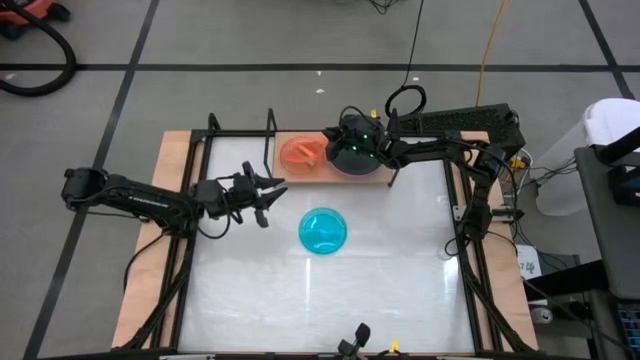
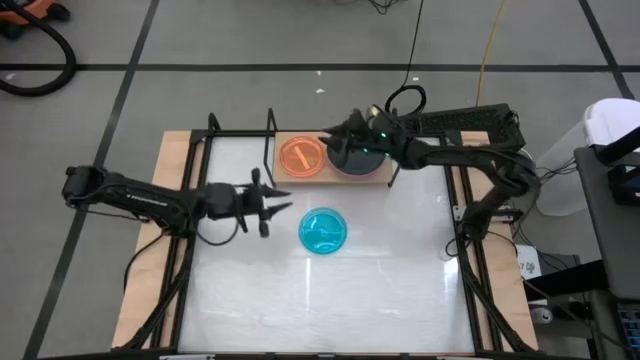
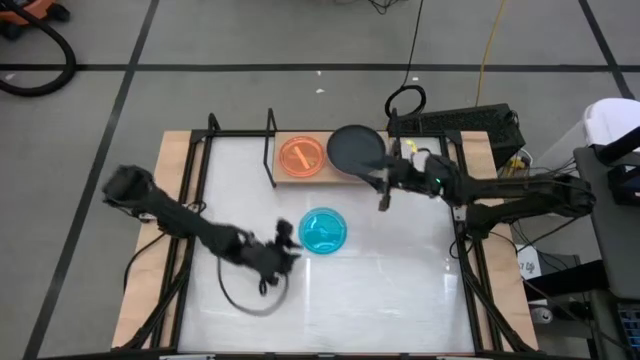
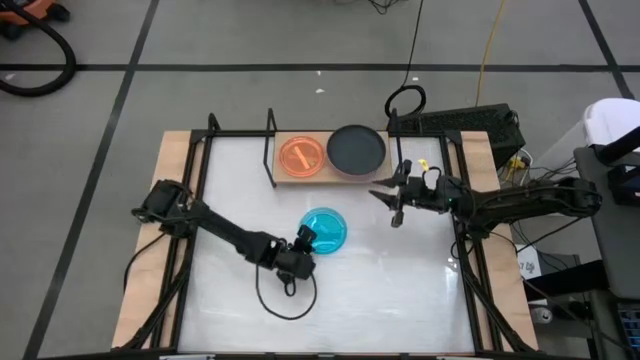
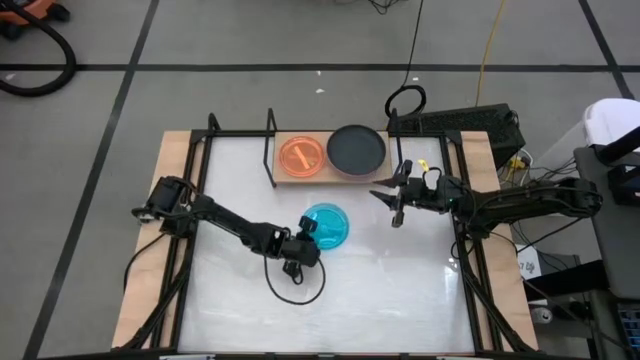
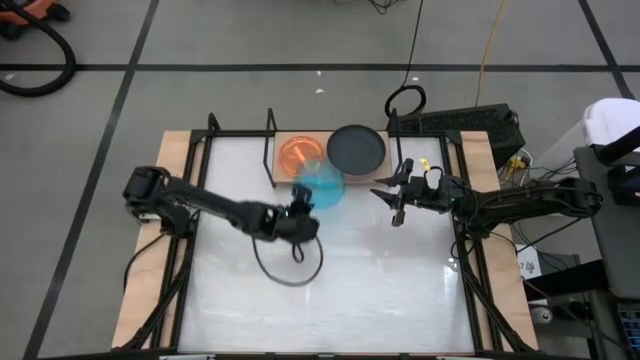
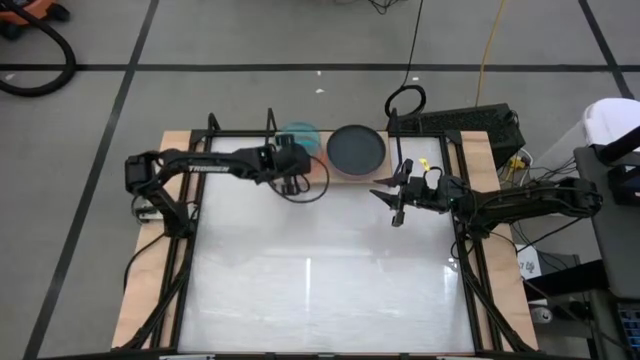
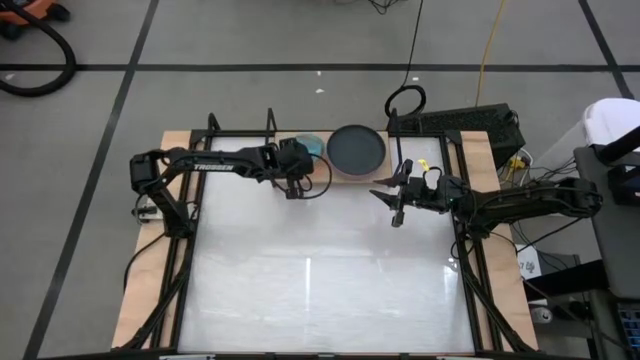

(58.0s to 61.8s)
Task: Place and stack plates onto a shelf
Stack the small blue plate on top of the small orange plate on the shelf

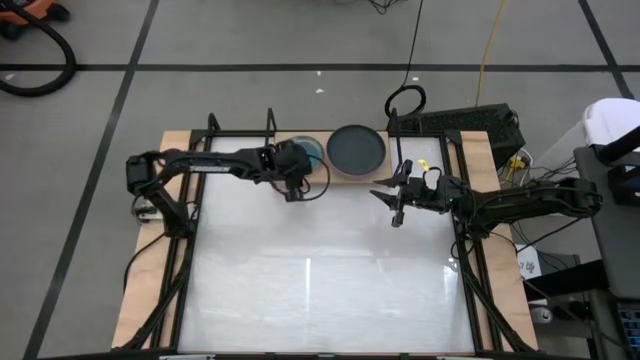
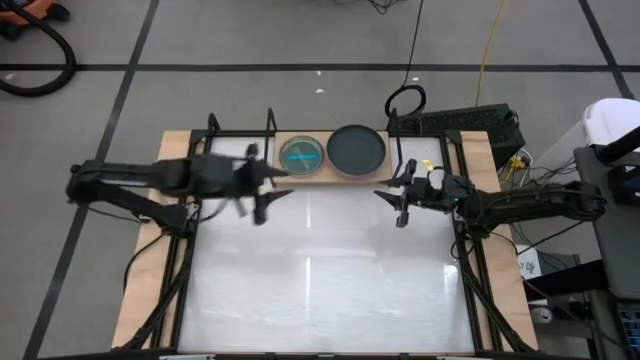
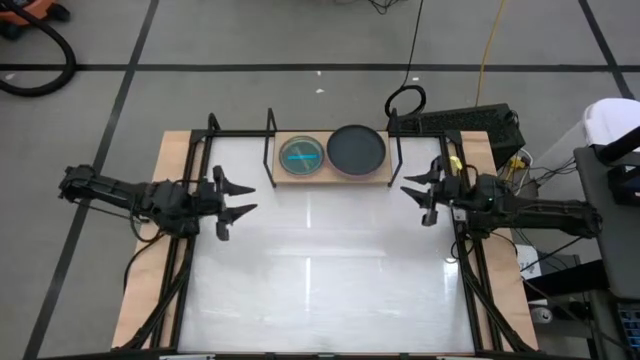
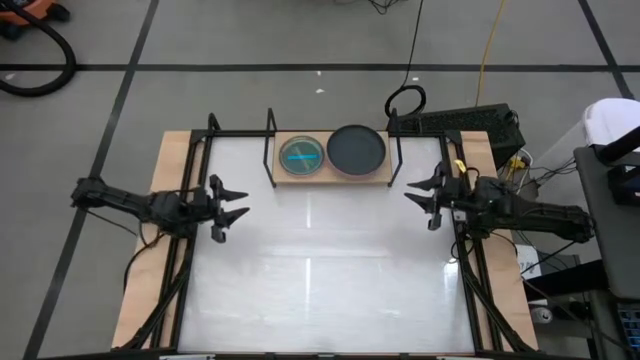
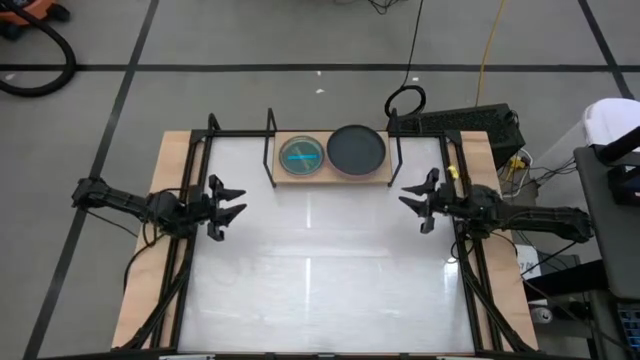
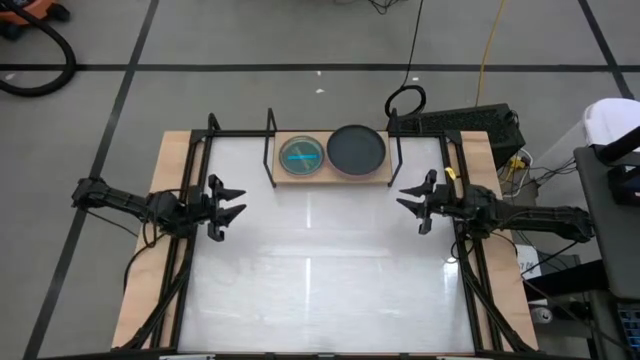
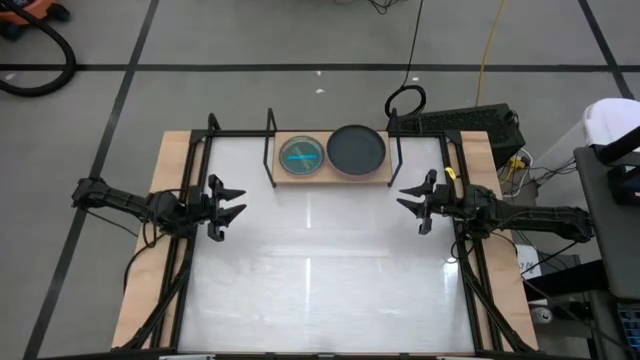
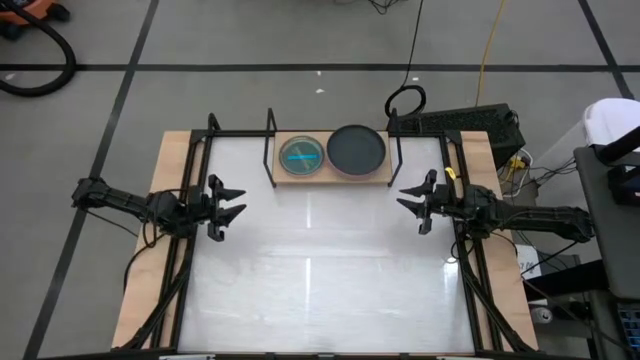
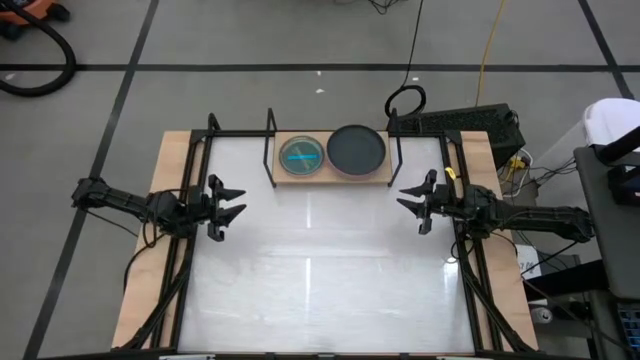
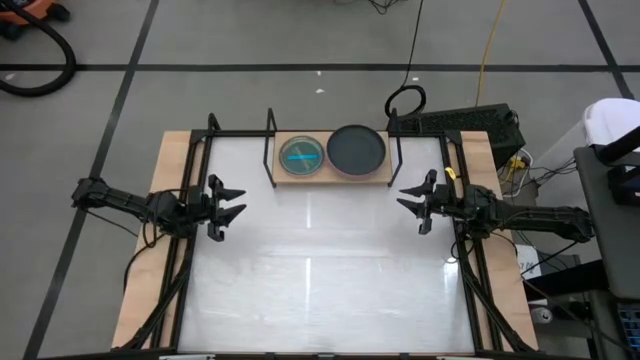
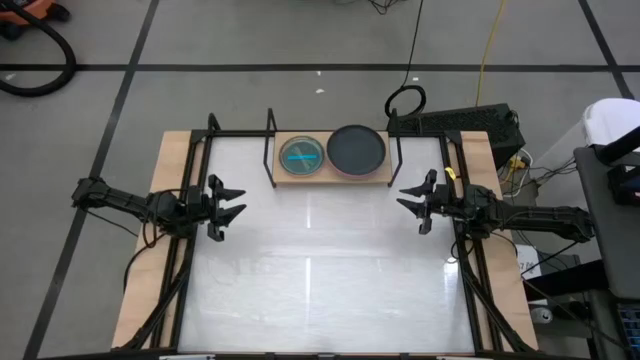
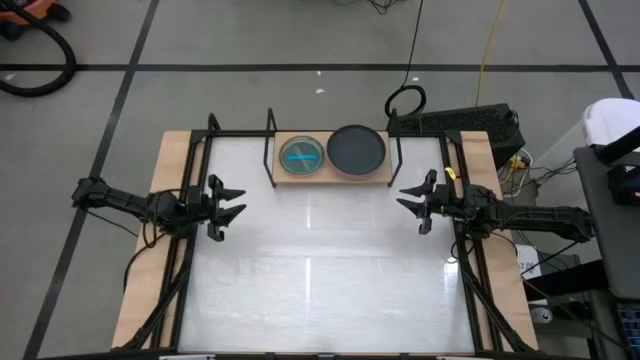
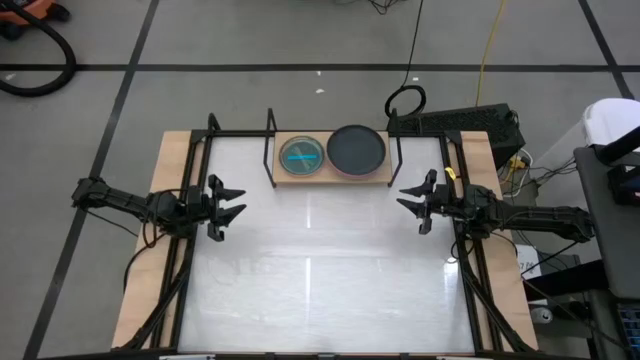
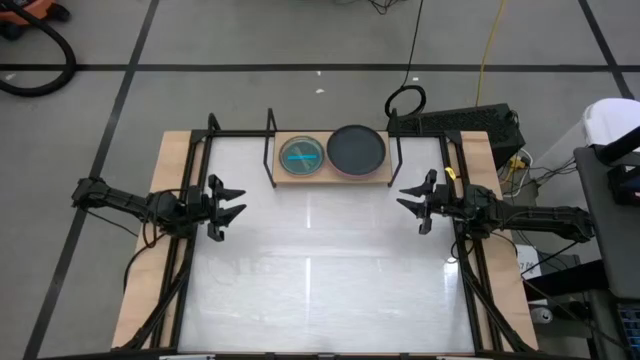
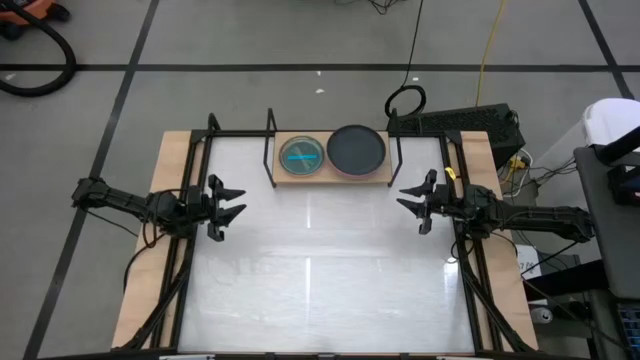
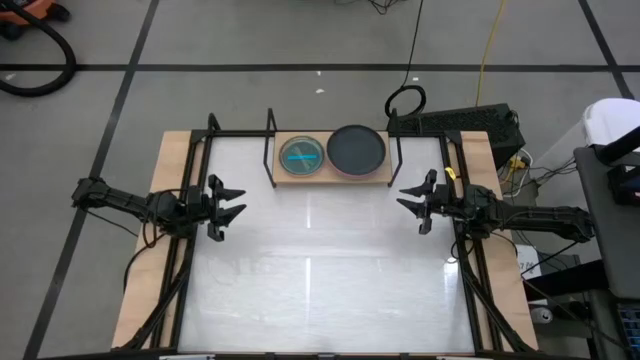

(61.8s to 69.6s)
Return to Home Position

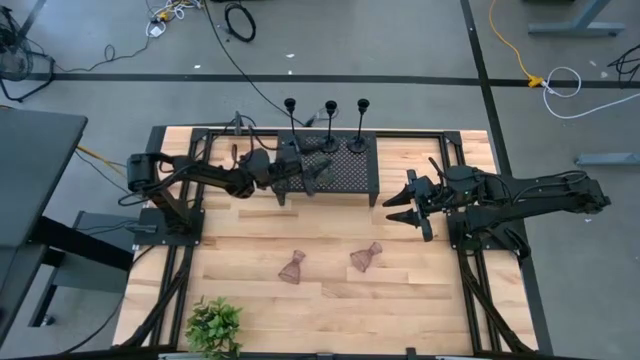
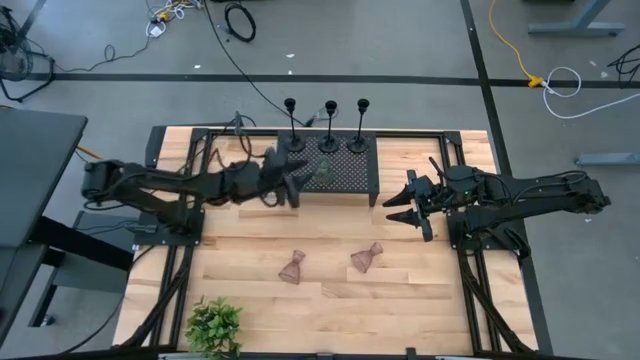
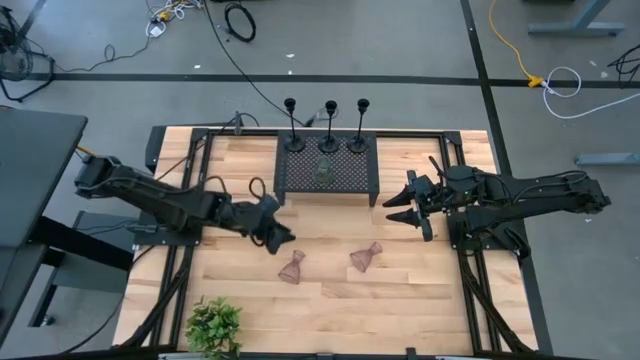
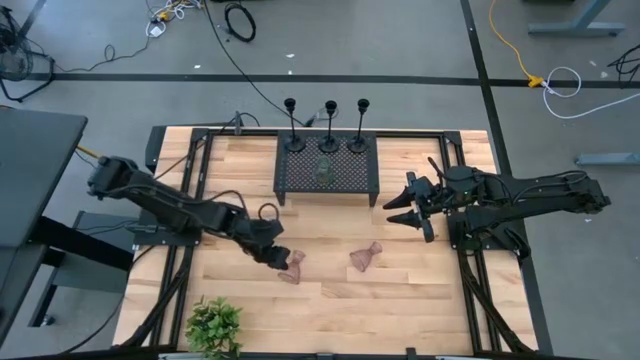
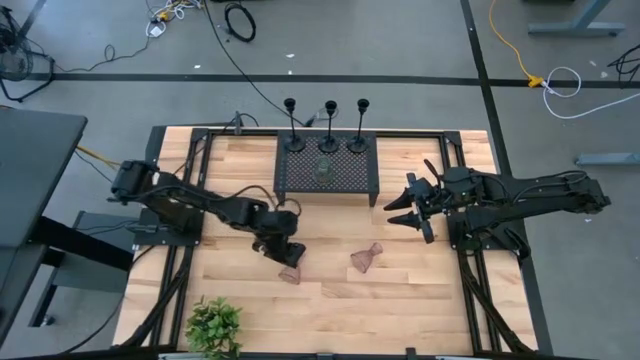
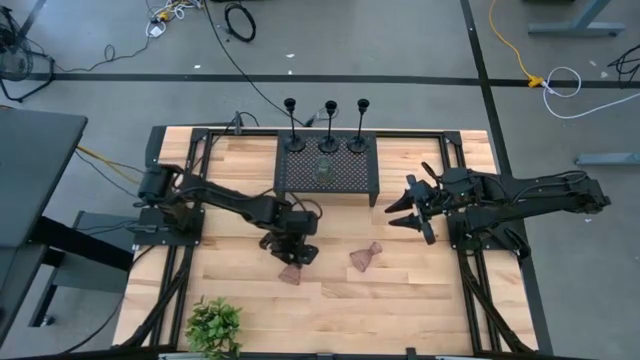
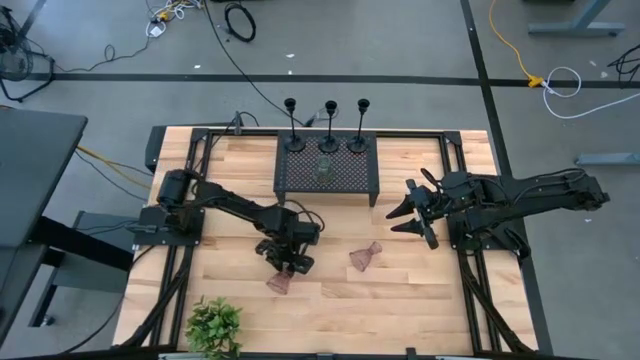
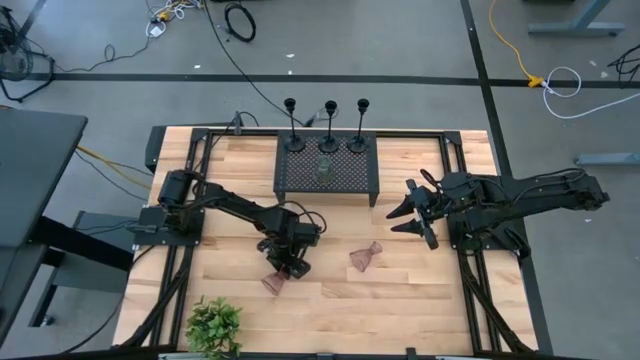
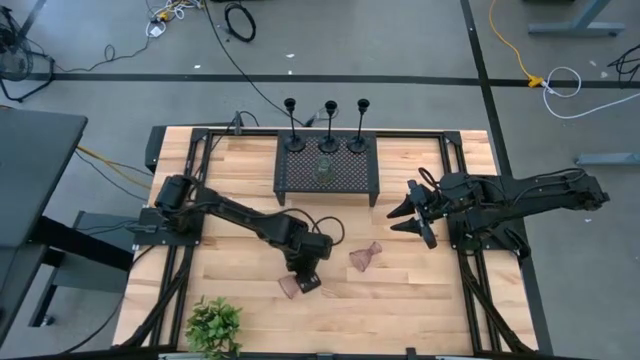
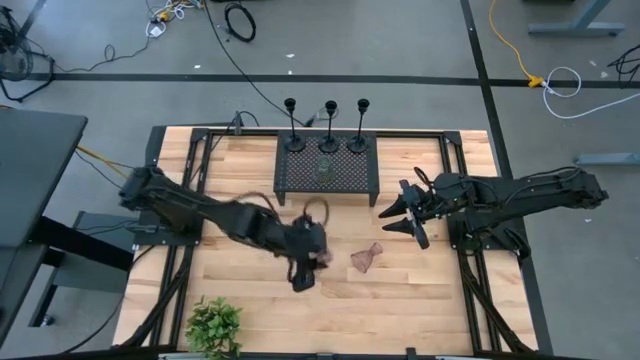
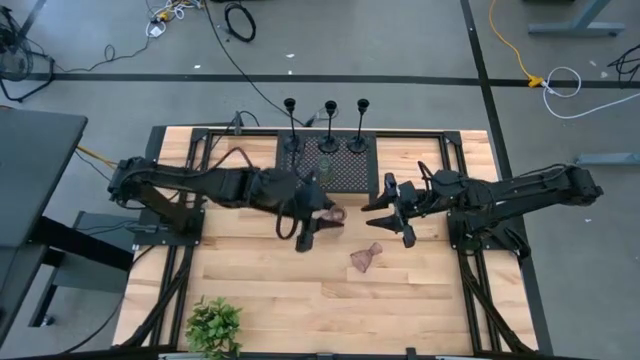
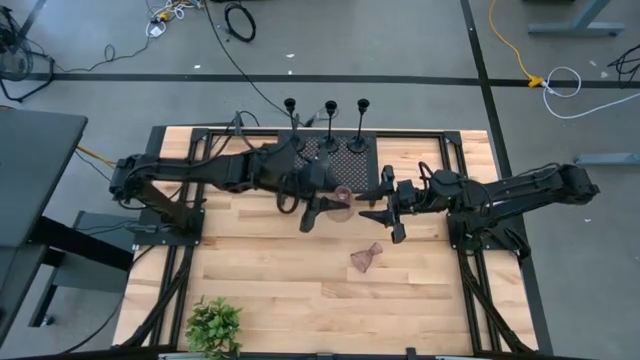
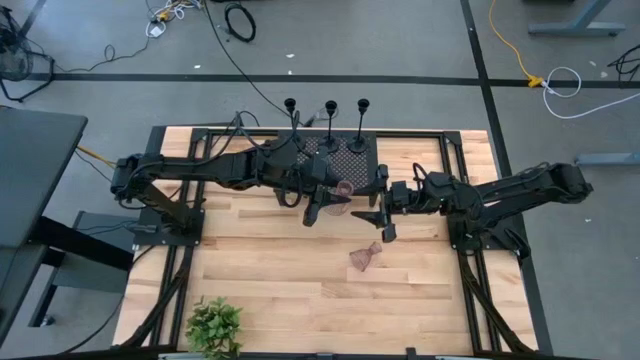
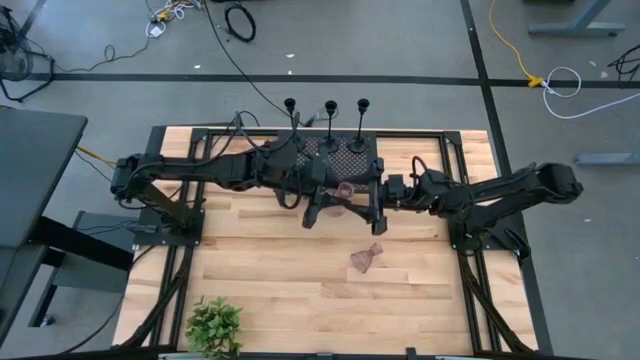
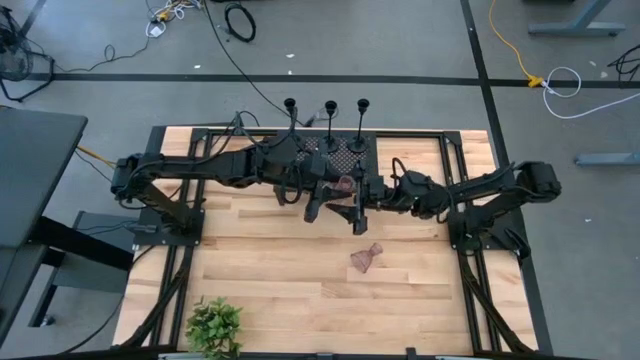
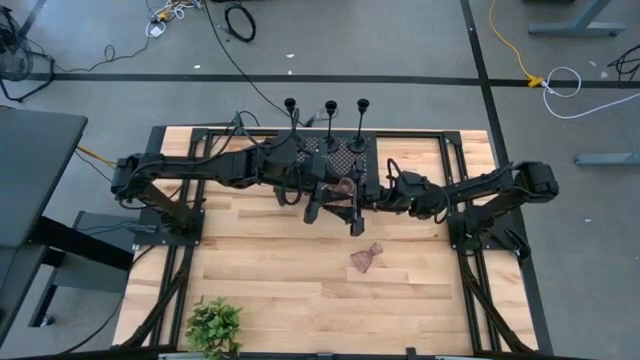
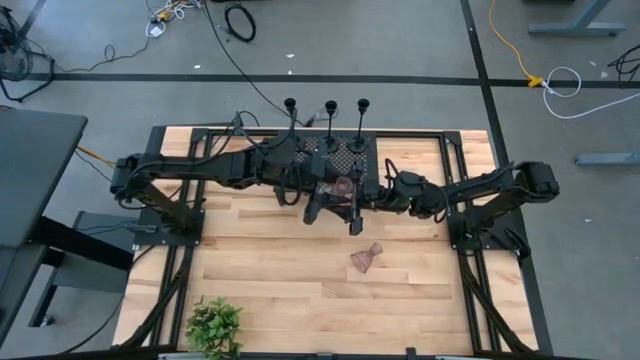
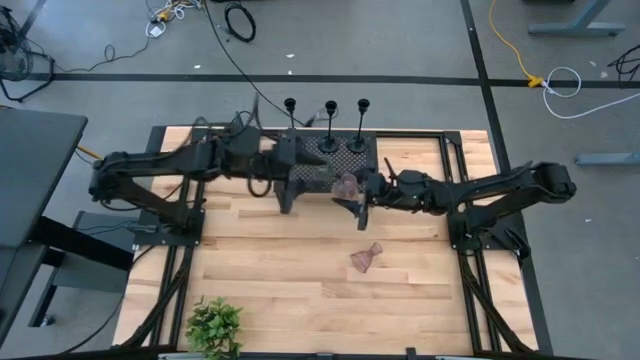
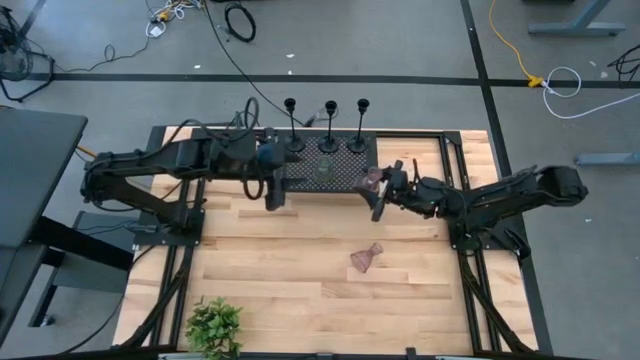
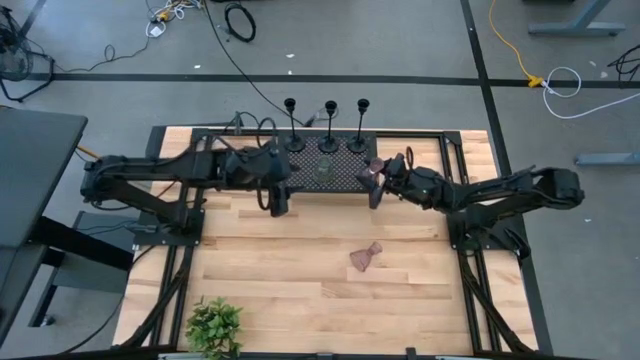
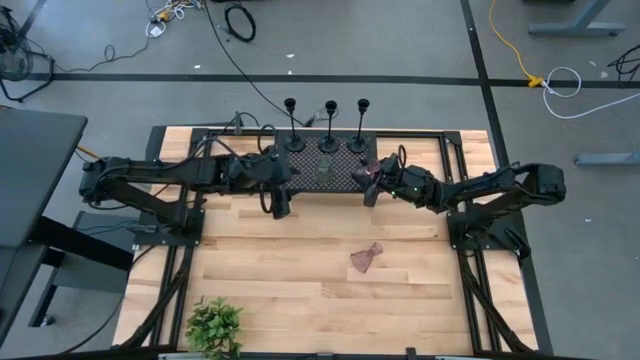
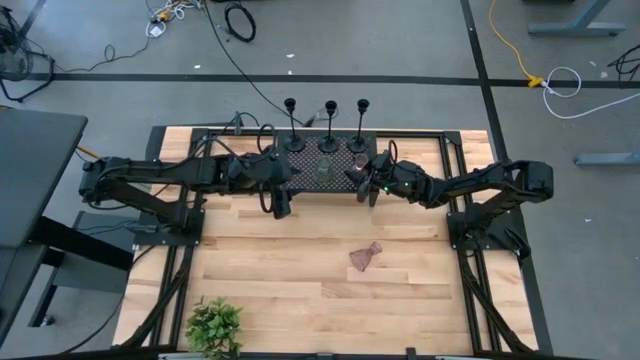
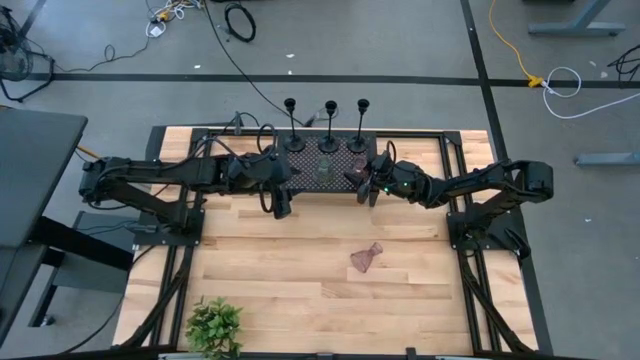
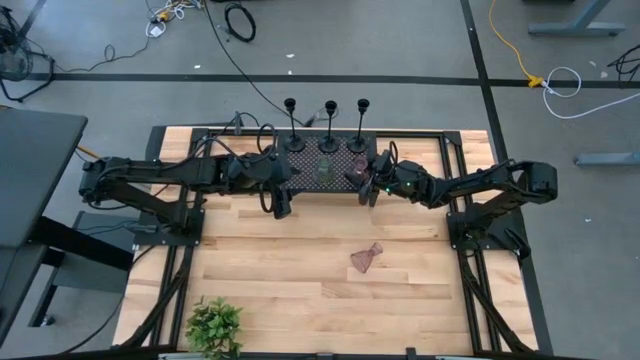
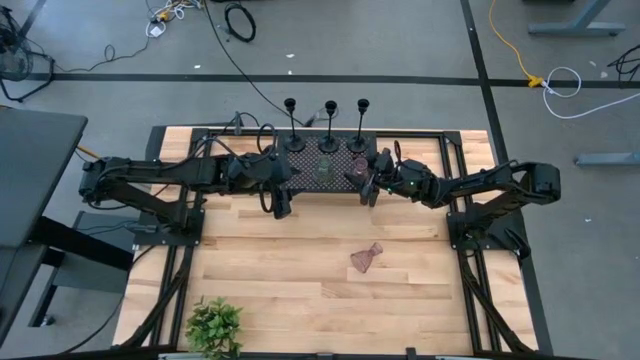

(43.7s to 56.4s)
Task: Pick & Place candle stick holders
Put the left purple glass candle holder on the shelf aligned with the other green glass candle holder
